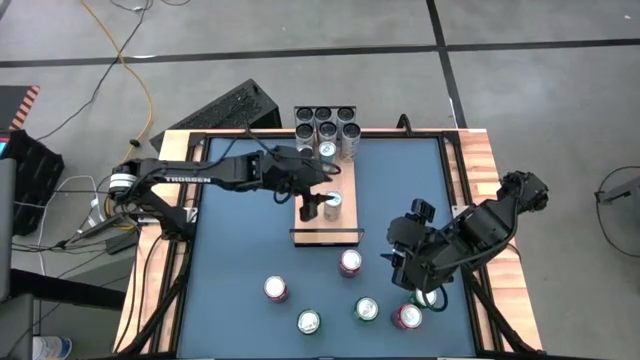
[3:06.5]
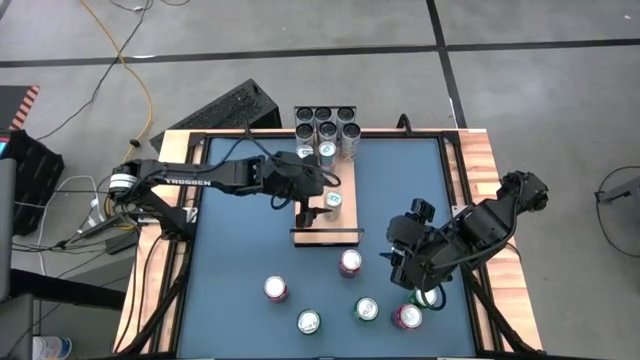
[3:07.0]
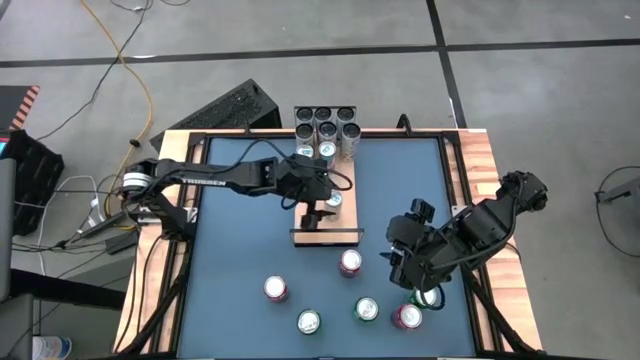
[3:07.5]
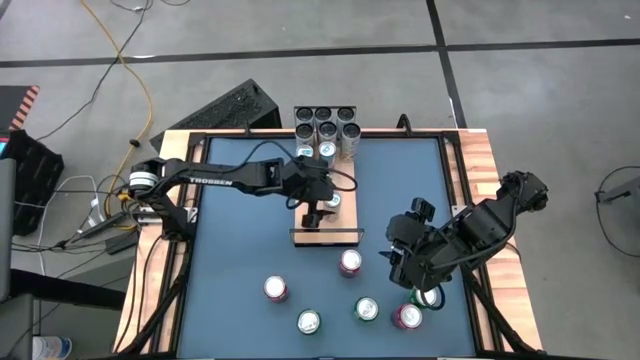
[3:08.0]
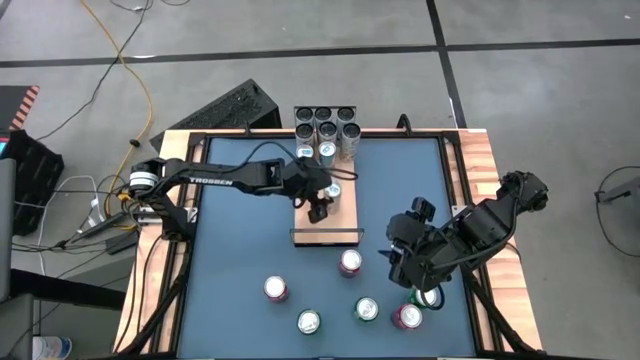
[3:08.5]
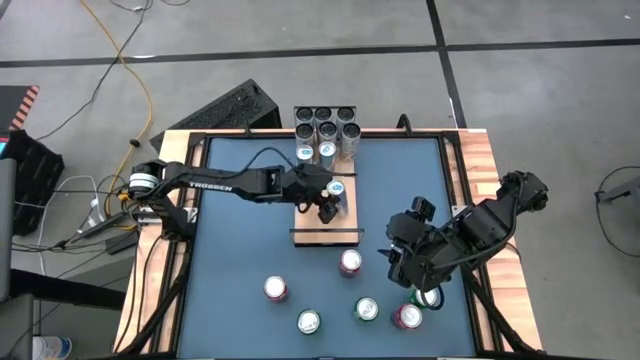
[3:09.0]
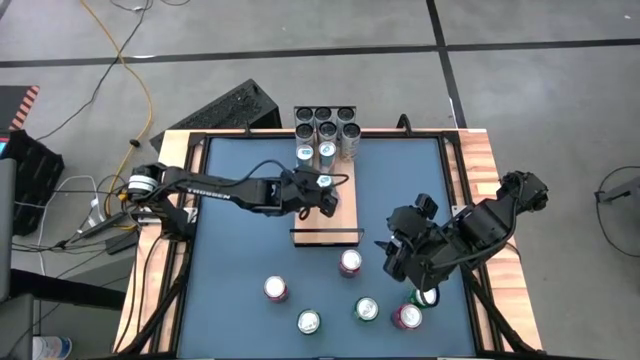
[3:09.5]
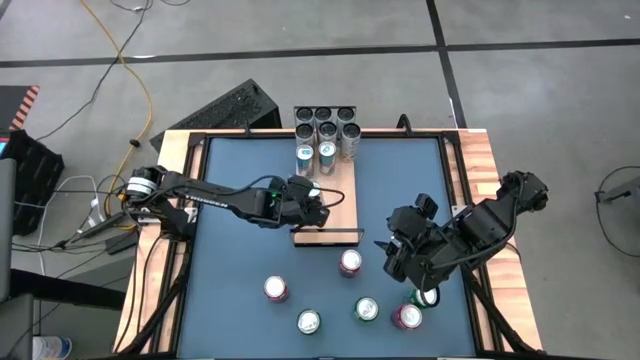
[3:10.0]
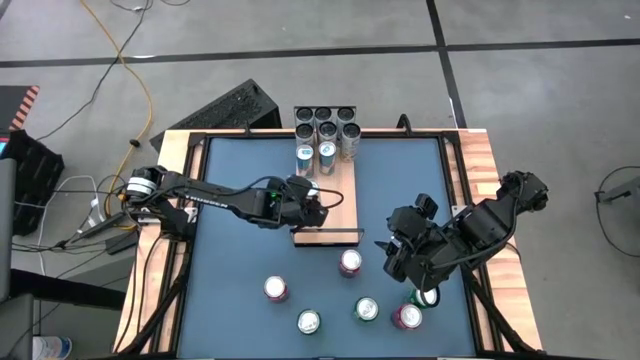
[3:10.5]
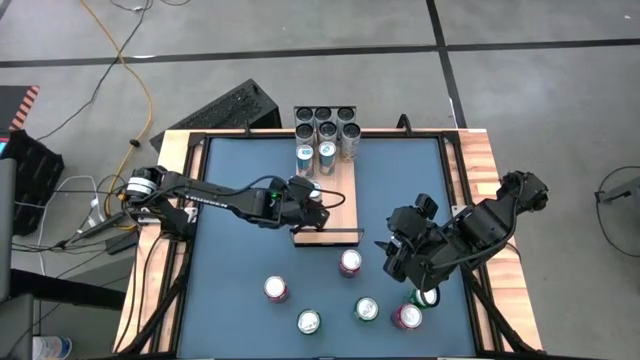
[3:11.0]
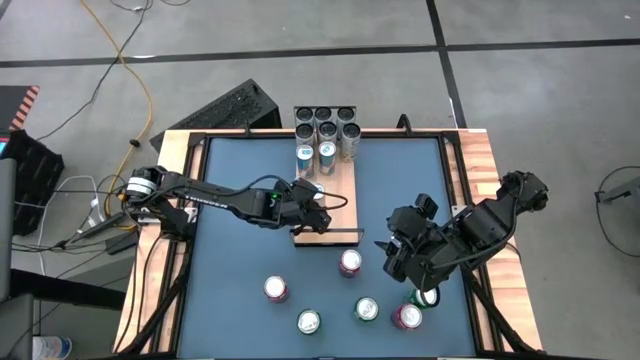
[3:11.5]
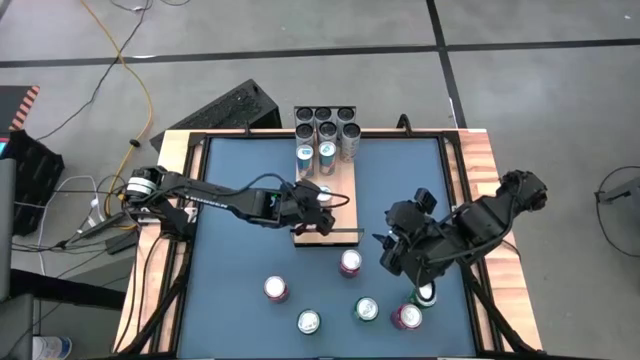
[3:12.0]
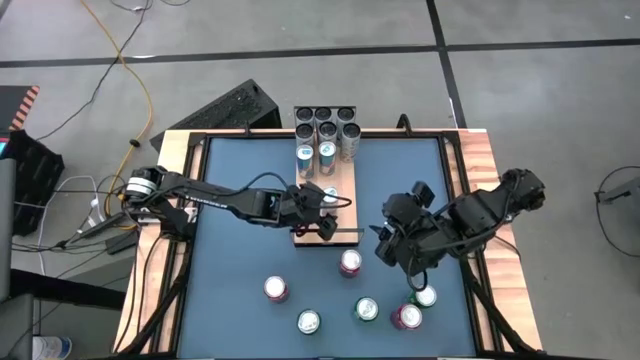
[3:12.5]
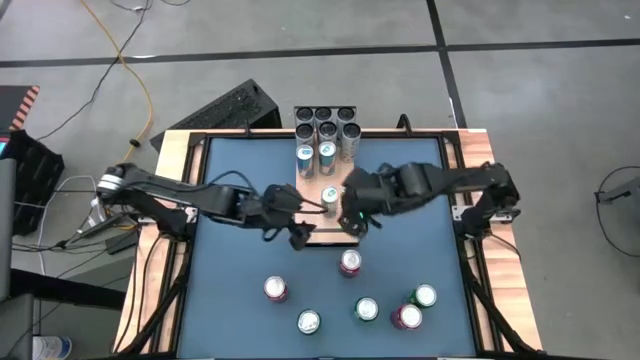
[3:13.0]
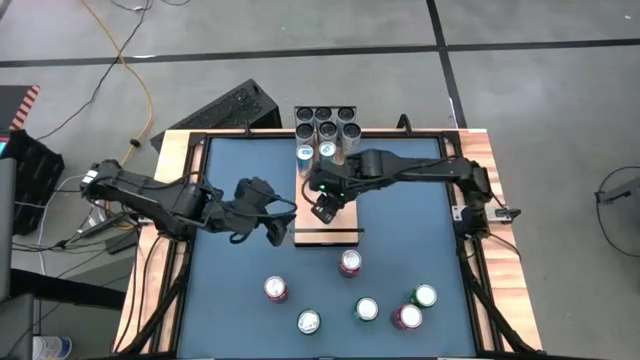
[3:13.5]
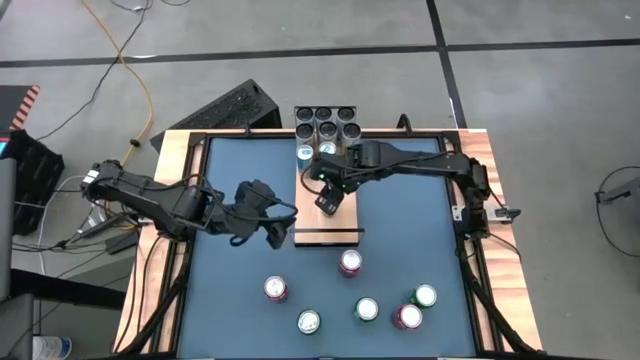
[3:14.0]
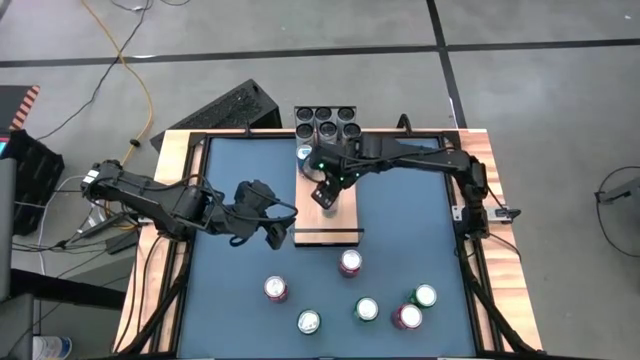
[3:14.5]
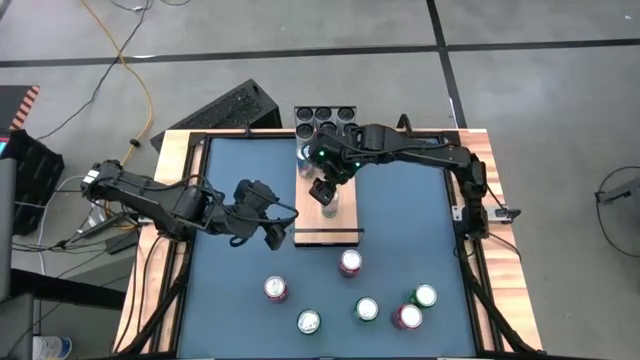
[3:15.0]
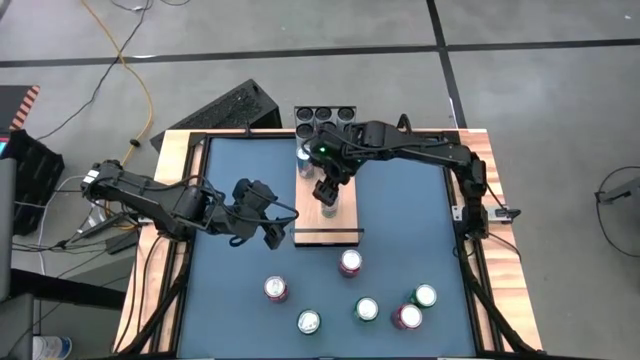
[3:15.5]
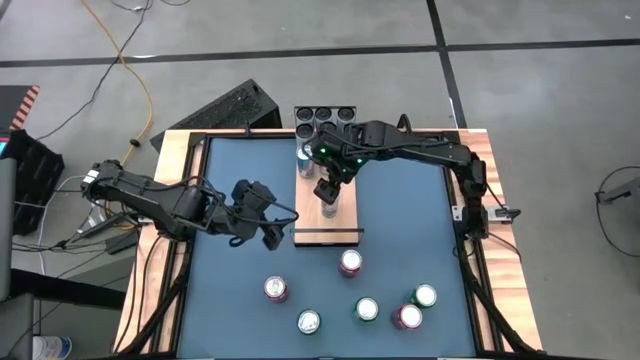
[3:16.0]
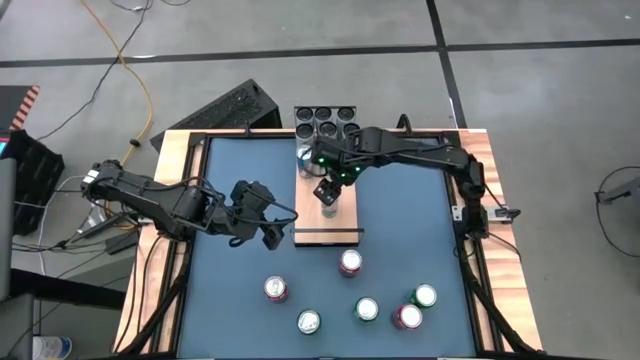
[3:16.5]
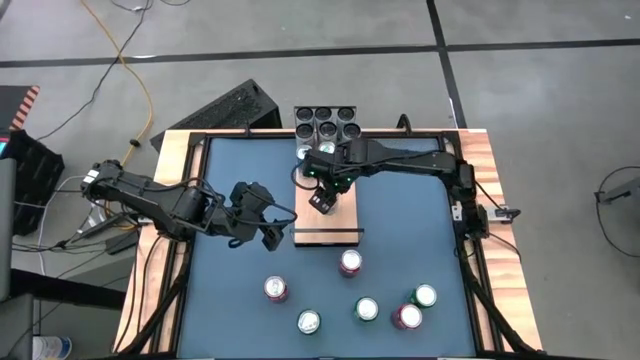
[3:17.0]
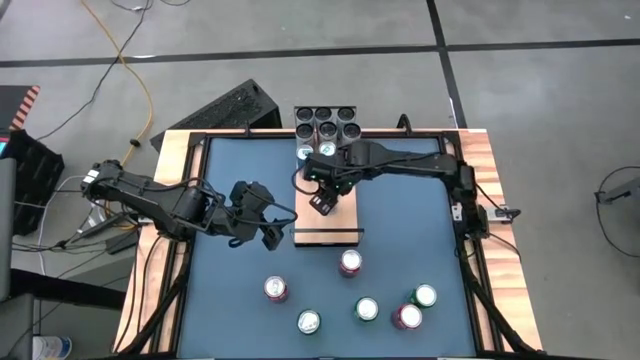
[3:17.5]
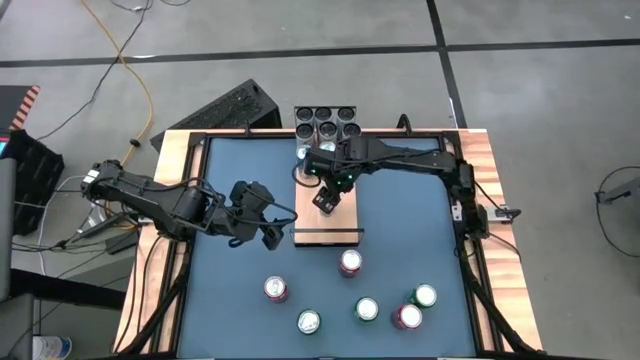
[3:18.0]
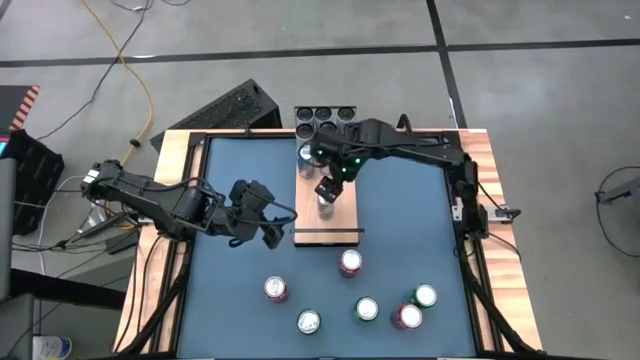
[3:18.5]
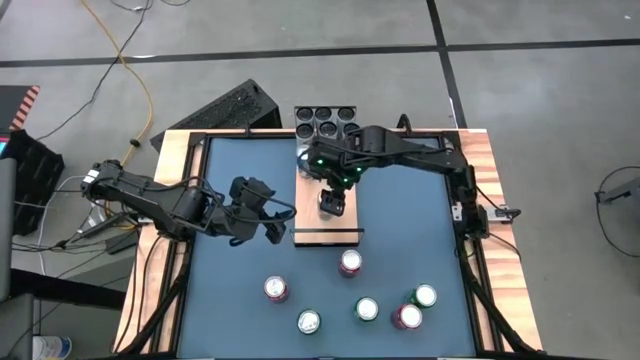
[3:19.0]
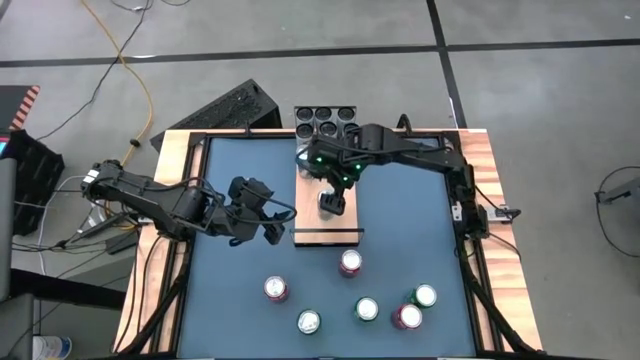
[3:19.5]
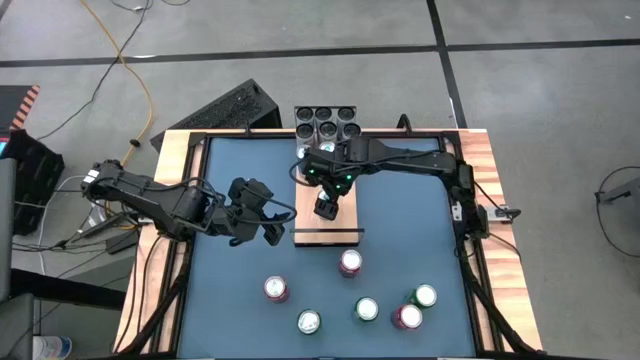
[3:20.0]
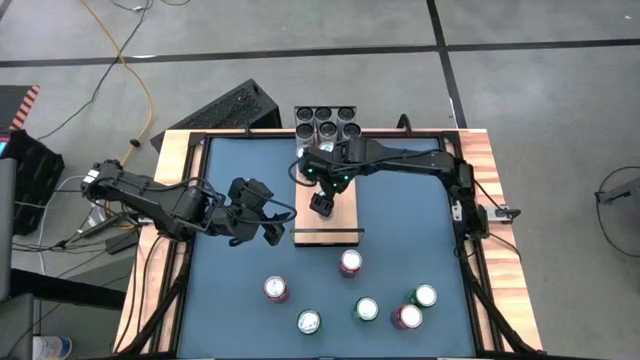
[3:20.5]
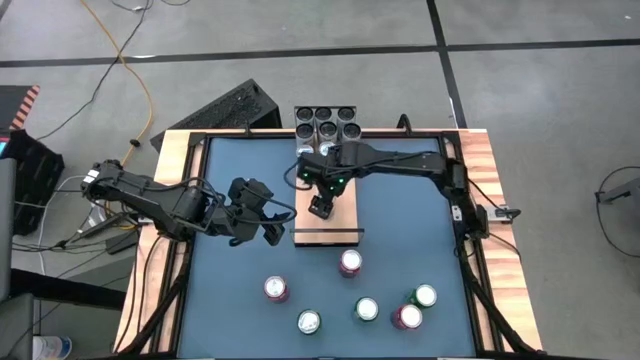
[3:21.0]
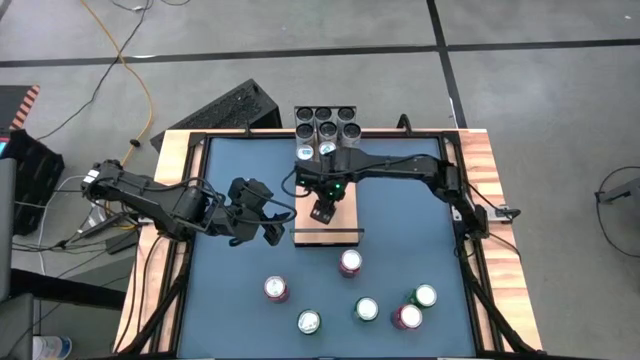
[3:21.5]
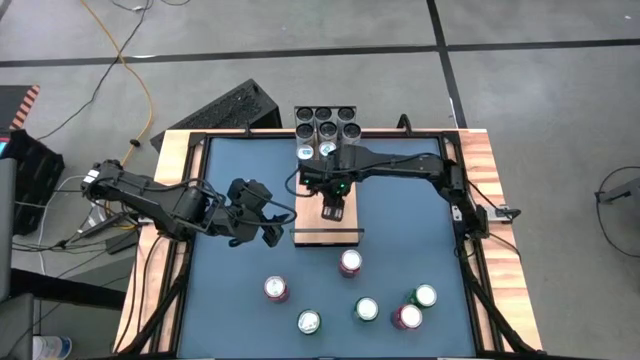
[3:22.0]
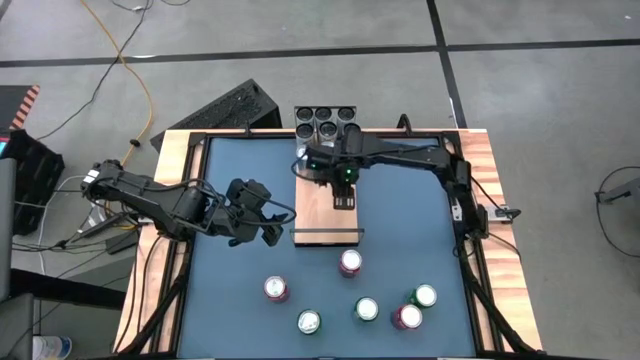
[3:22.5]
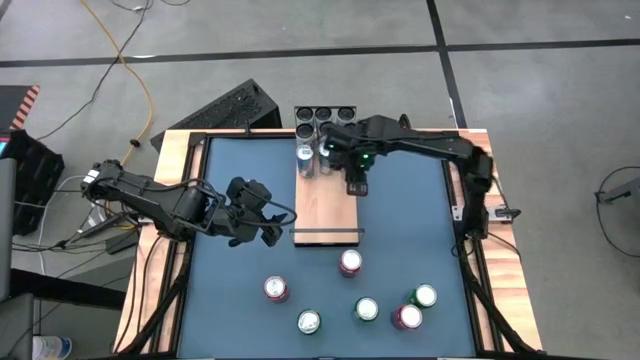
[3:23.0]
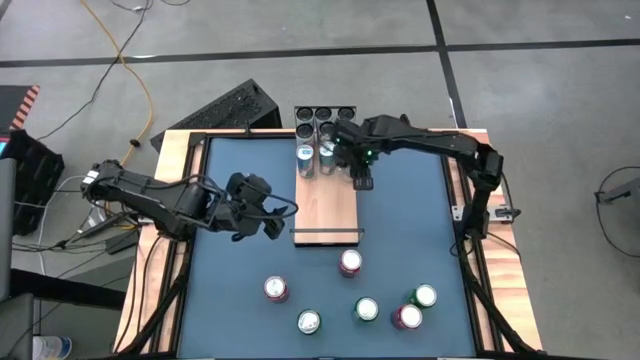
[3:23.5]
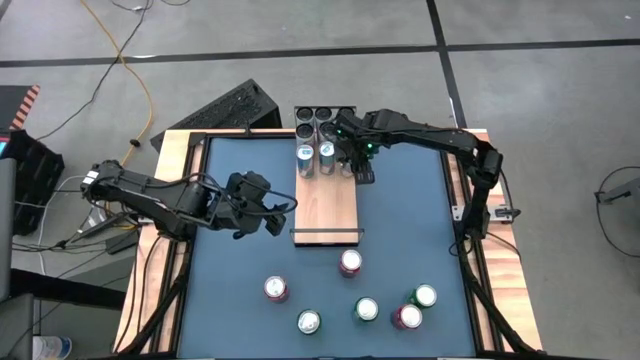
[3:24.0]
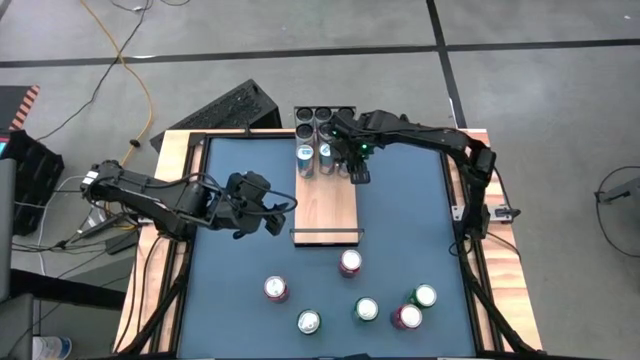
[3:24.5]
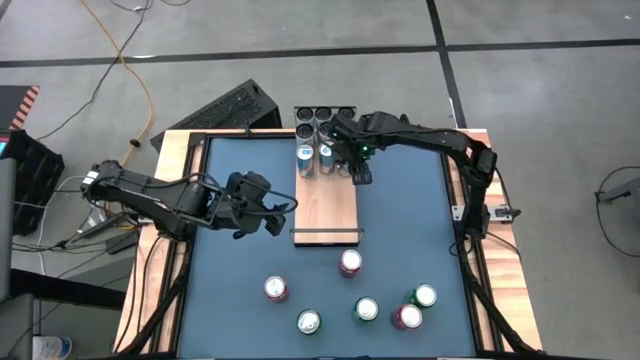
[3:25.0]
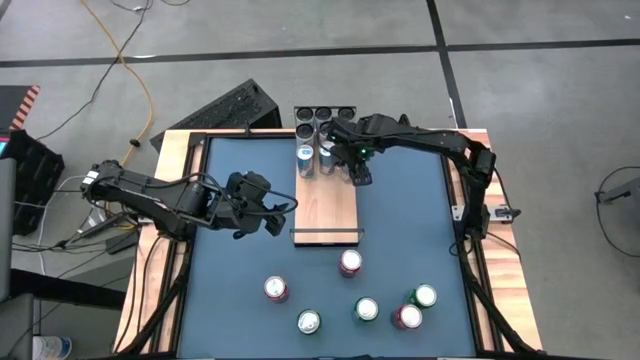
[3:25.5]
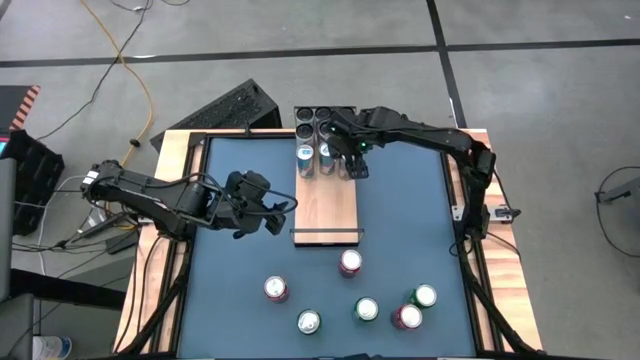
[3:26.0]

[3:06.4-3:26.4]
Task: Place canned beverage on shelf
Put the blue soda can on the shelf aligned with the other blue soda cans
